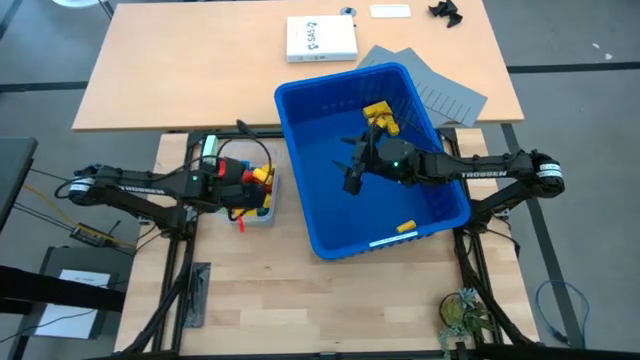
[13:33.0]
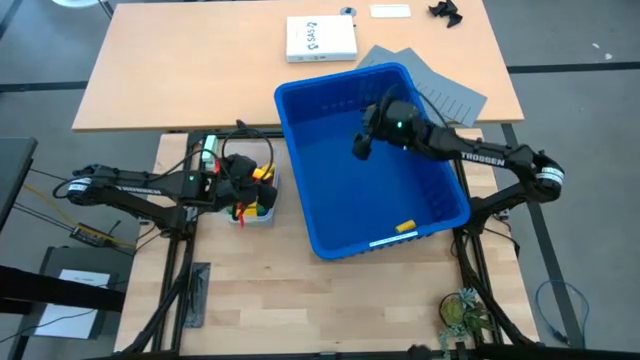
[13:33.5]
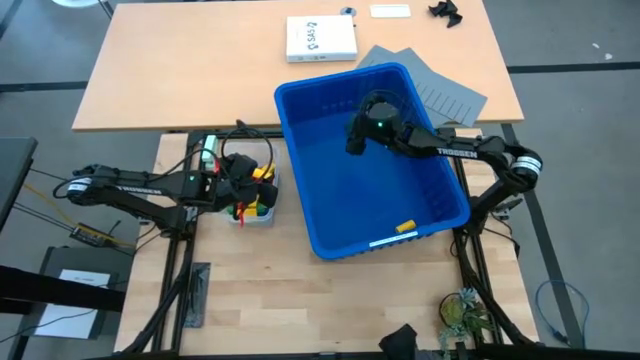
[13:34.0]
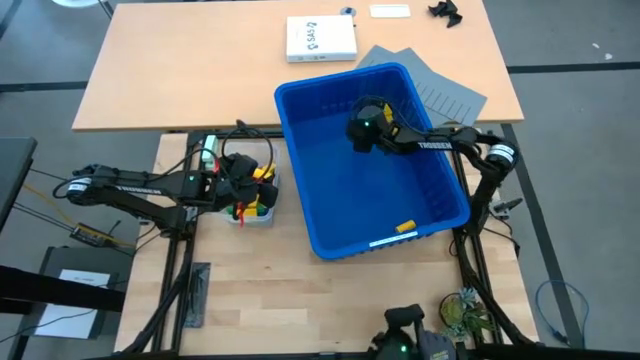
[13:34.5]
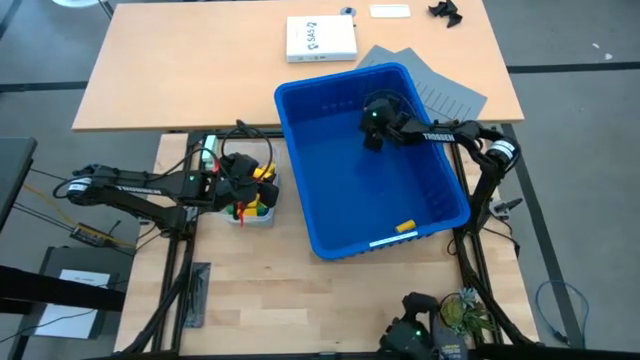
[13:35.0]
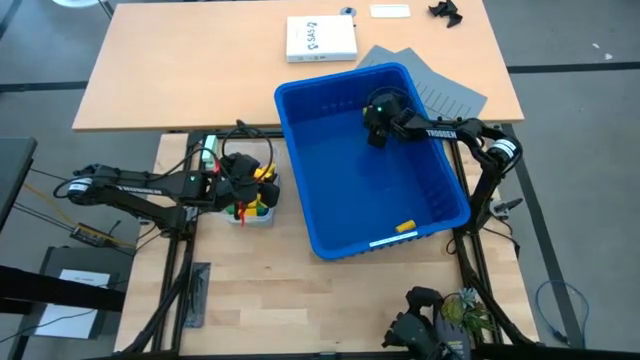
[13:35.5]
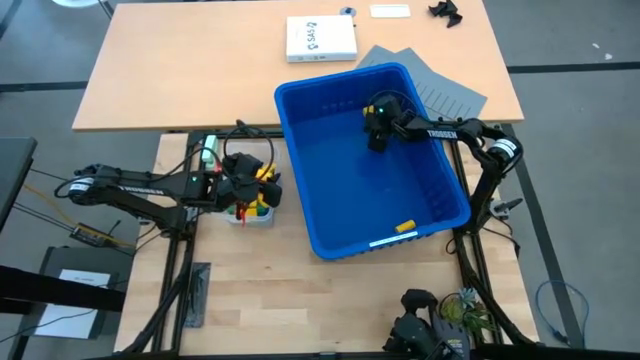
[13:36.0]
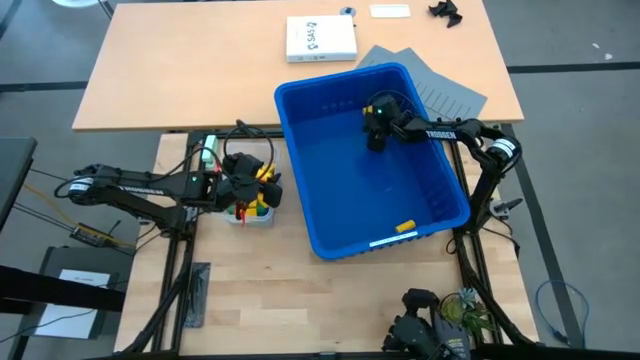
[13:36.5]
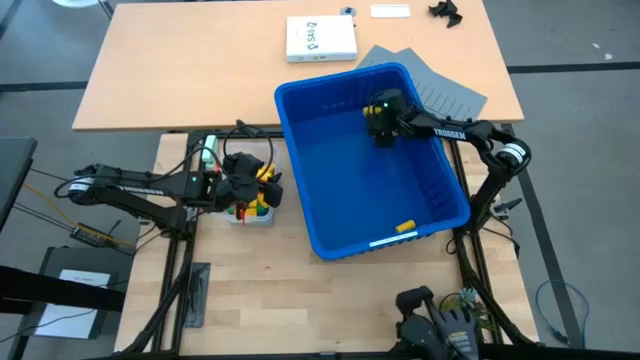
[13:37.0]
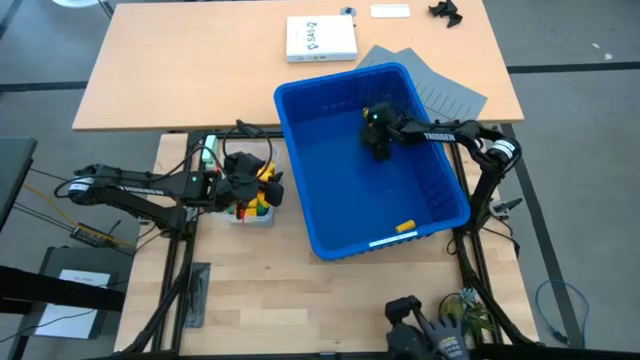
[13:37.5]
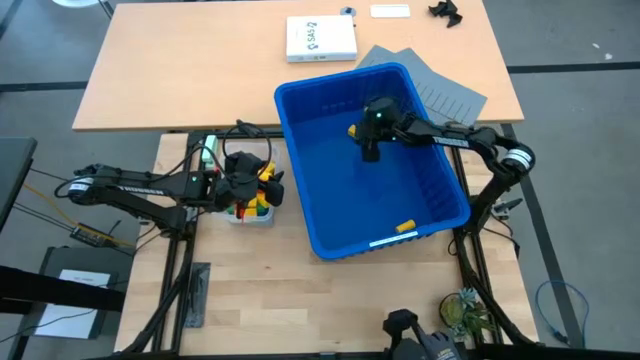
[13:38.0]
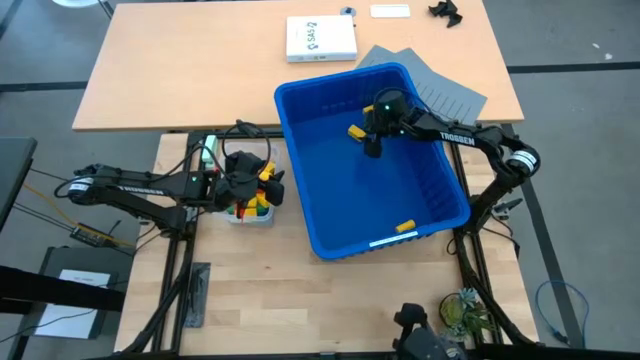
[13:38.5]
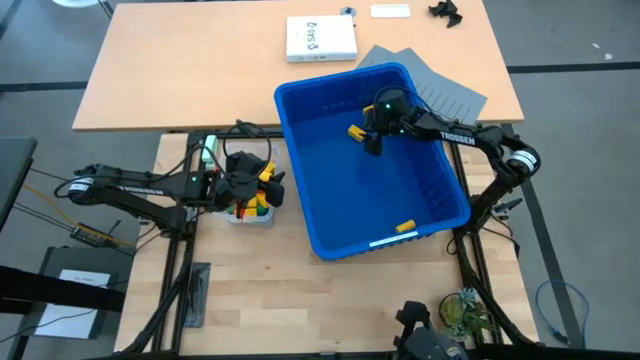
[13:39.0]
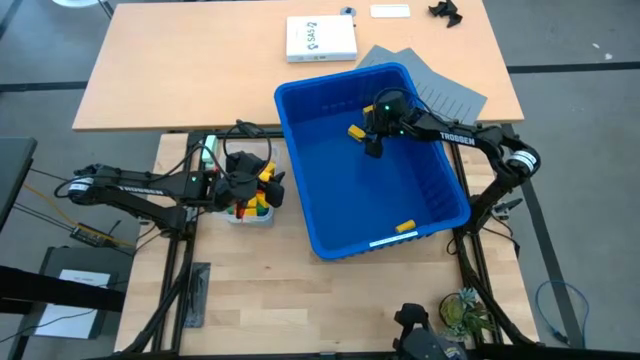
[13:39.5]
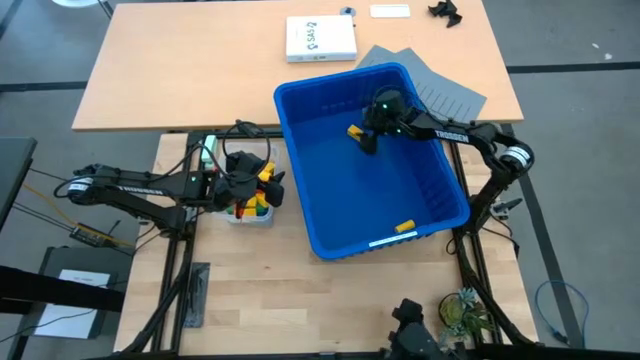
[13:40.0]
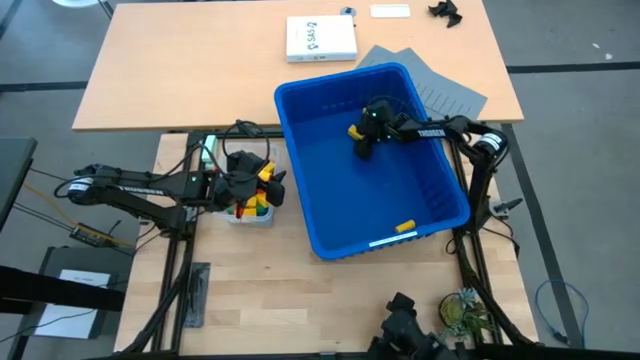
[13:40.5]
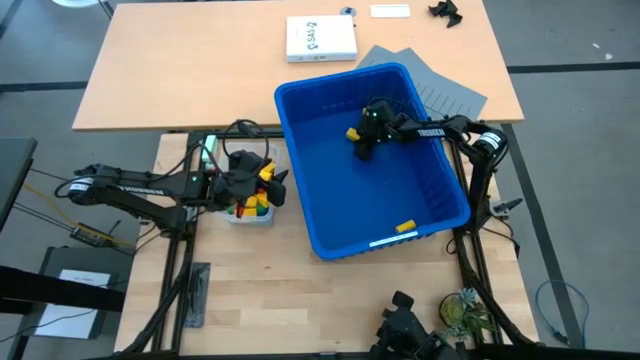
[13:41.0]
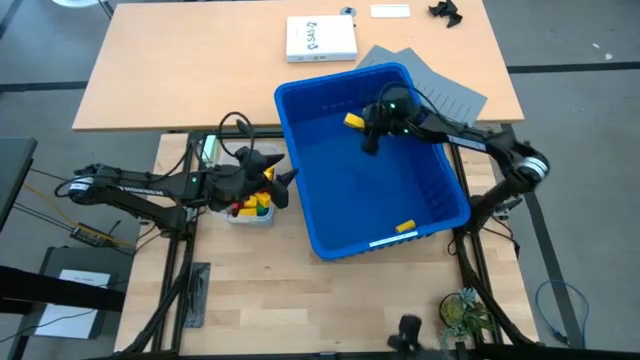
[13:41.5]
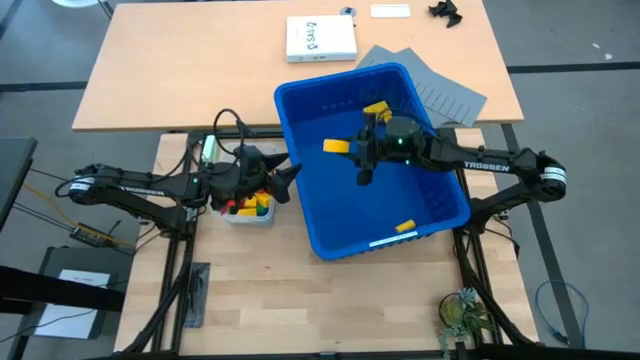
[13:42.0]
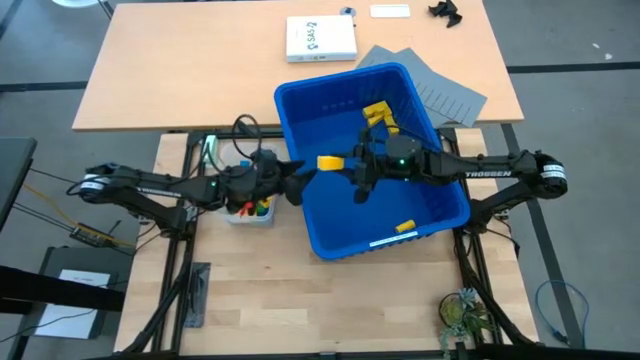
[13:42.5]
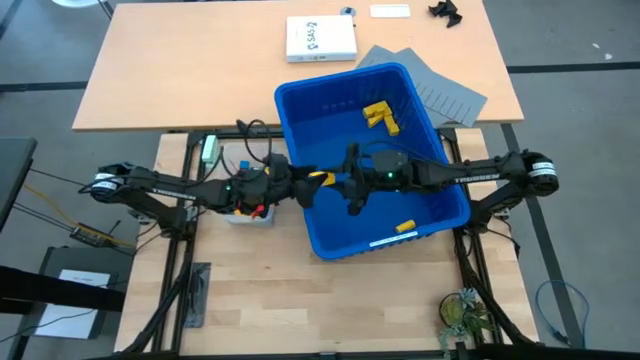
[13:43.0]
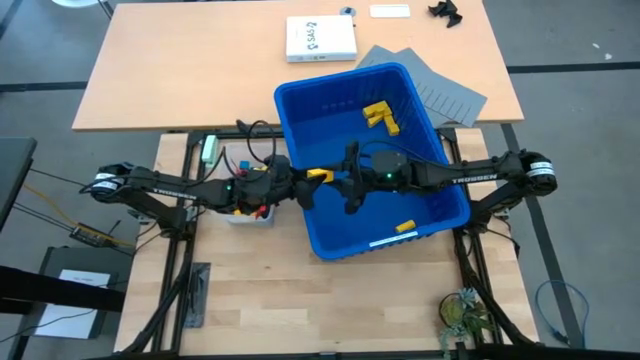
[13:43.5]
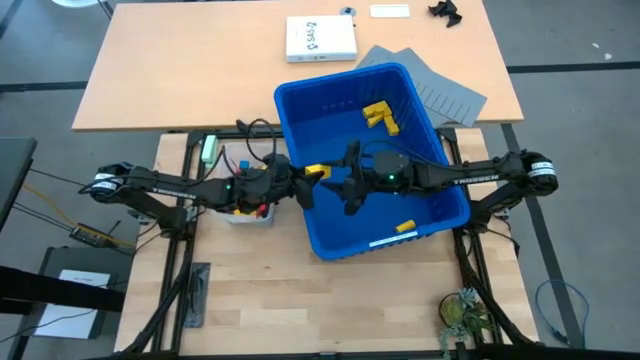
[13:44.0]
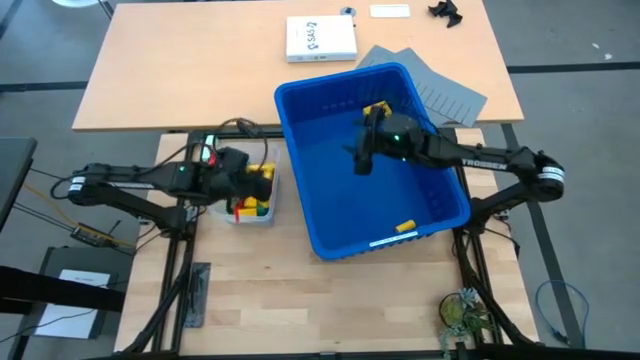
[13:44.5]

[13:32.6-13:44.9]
Task: Sort blocks
Put the yellow block into the transparent bin

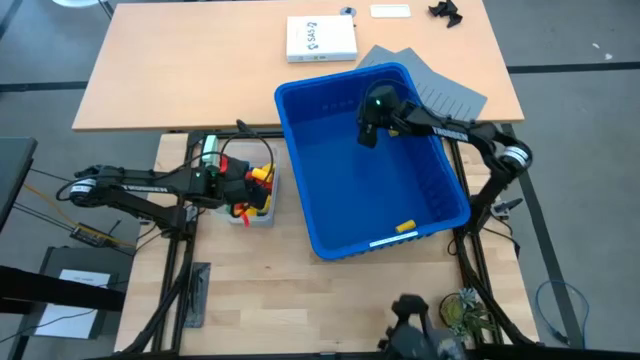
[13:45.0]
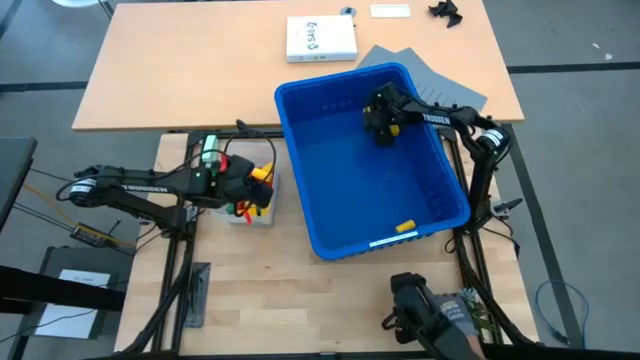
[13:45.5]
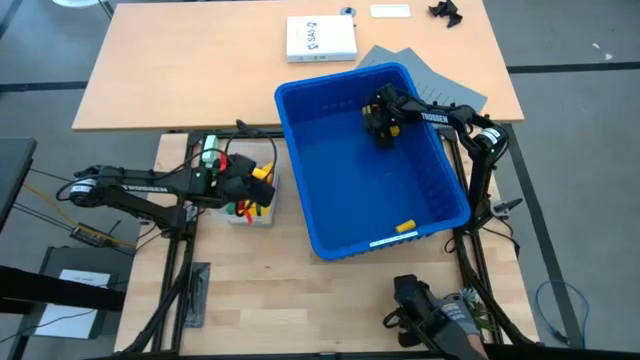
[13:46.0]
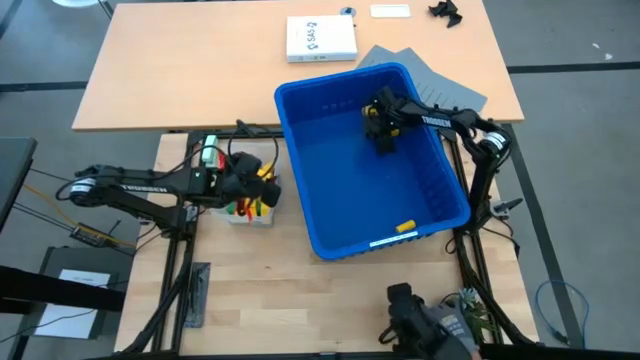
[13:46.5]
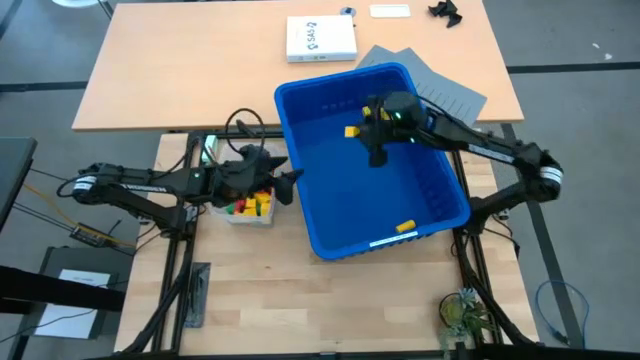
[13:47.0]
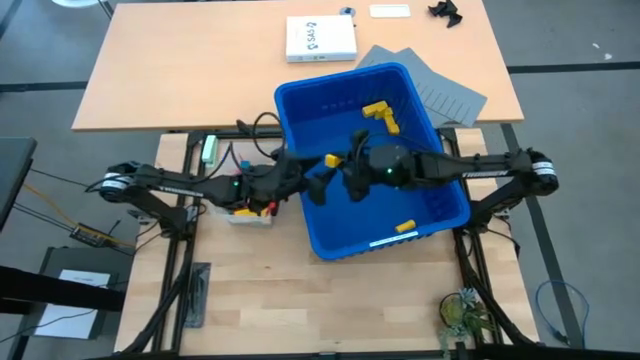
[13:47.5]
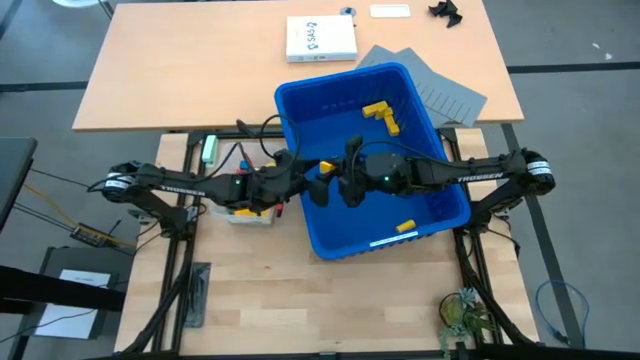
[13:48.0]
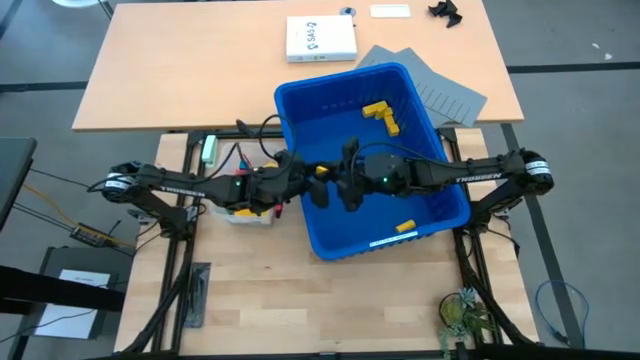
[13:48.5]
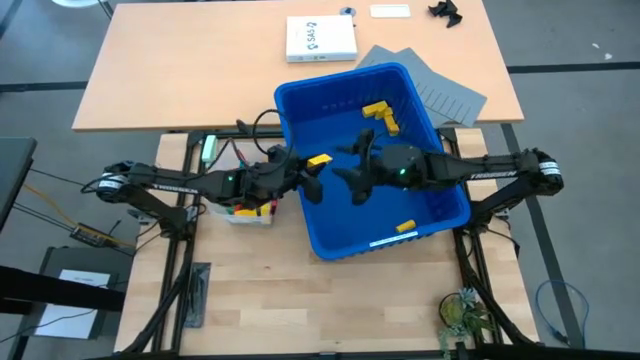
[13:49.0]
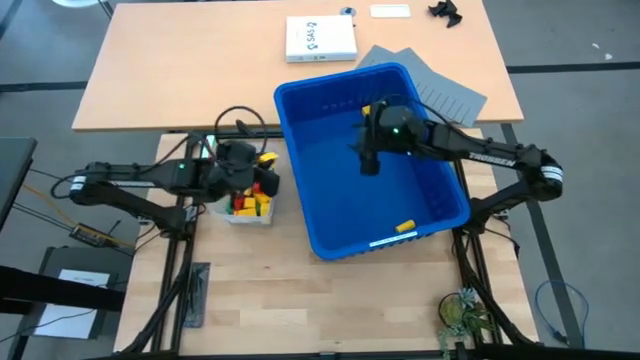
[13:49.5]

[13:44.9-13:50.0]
Put the yellow block into the transparent bin

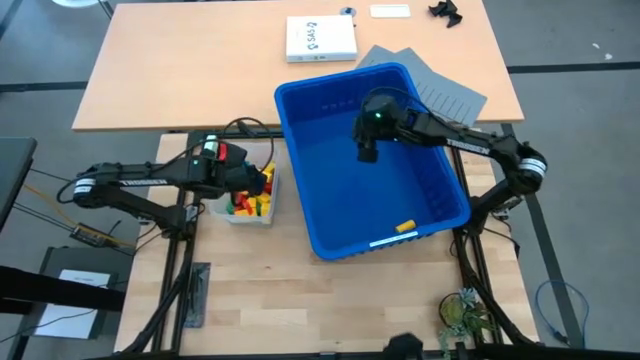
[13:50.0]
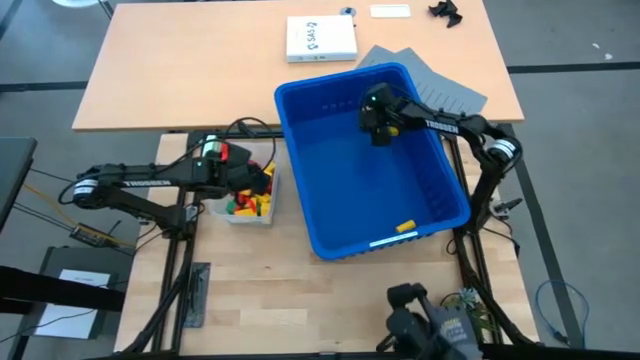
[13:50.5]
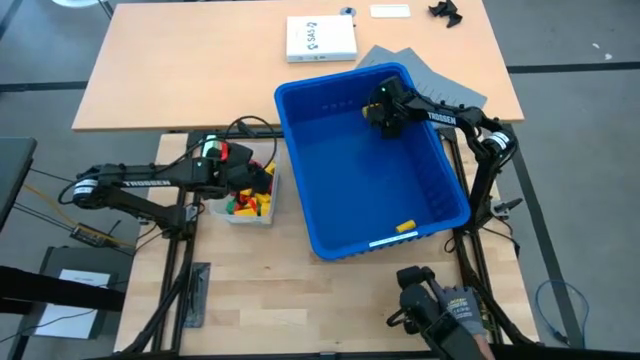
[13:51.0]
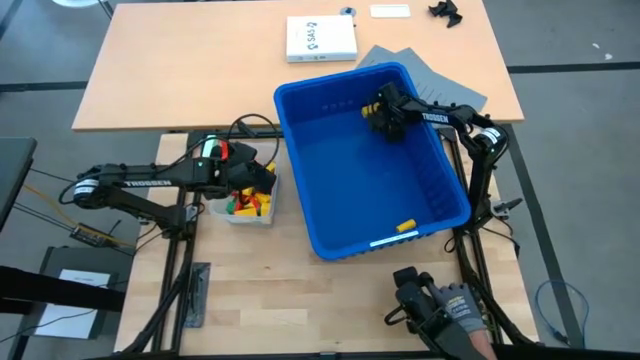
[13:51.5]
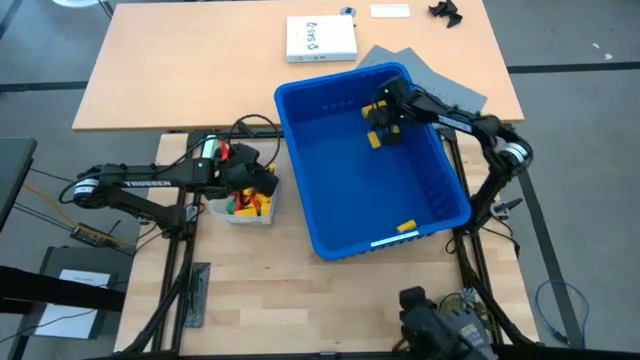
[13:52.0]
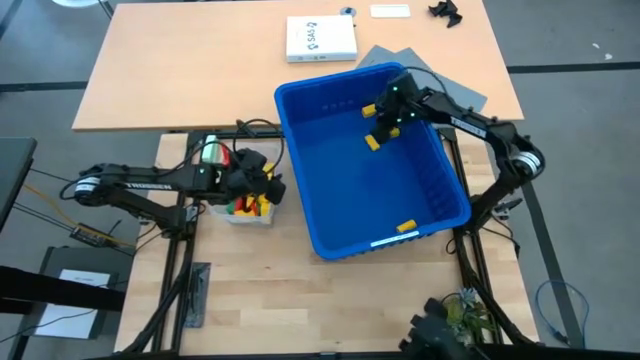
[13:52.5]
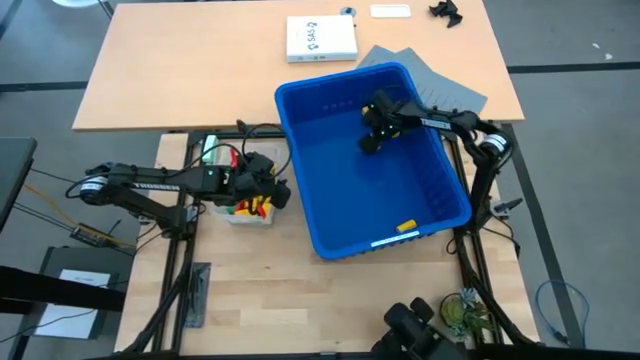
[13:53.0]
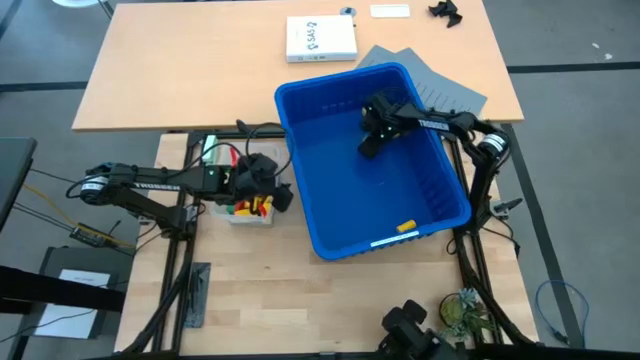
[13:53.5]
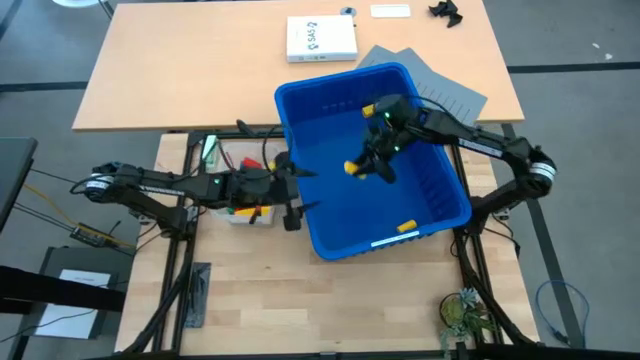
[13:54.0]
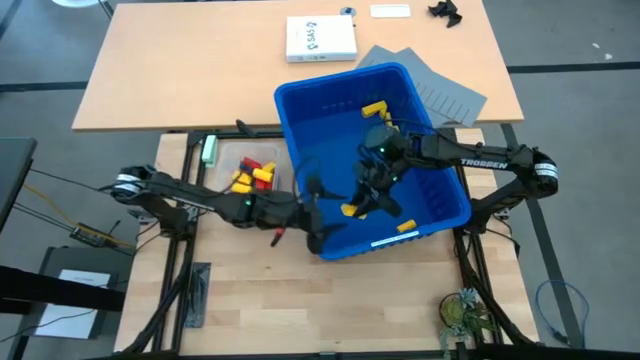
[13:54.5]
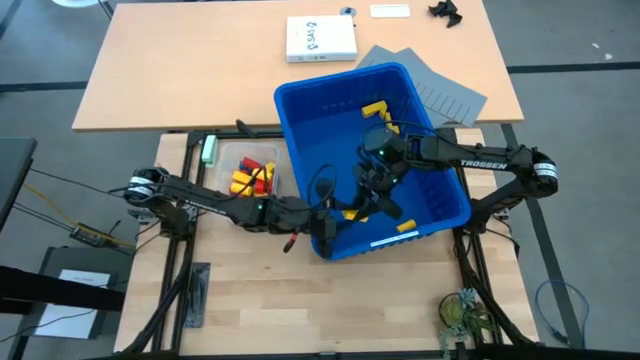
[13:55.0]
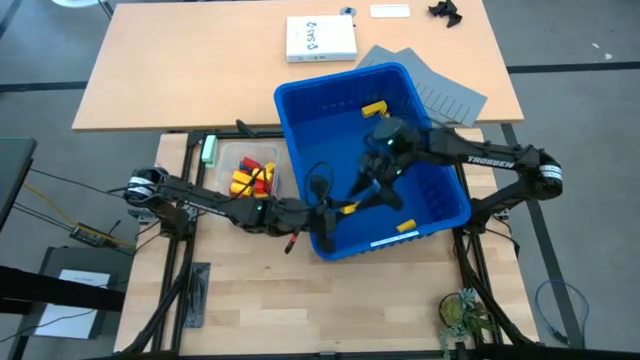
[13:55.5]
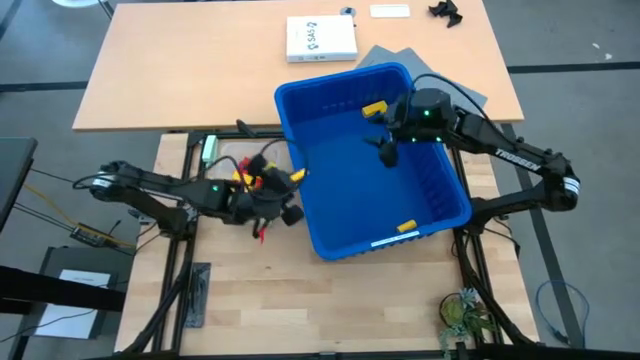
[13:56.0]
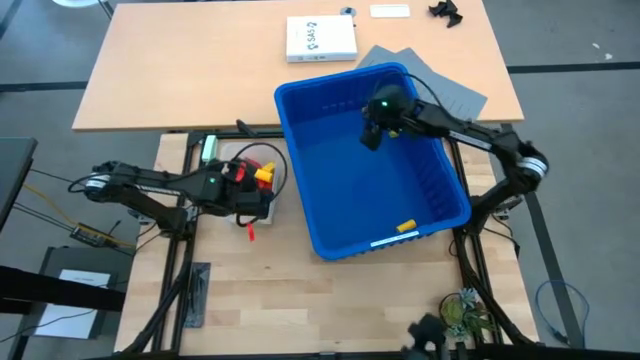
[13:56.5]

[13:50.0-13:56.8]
Put the yellow block into the transparent bin
